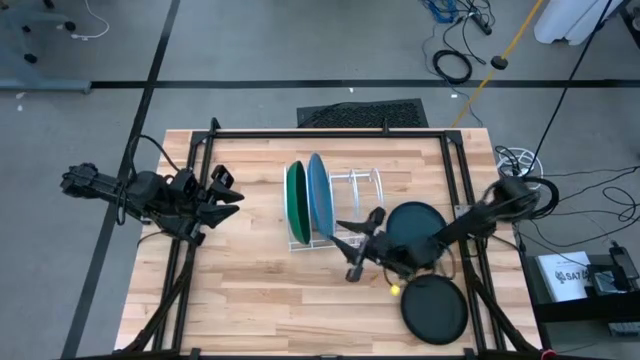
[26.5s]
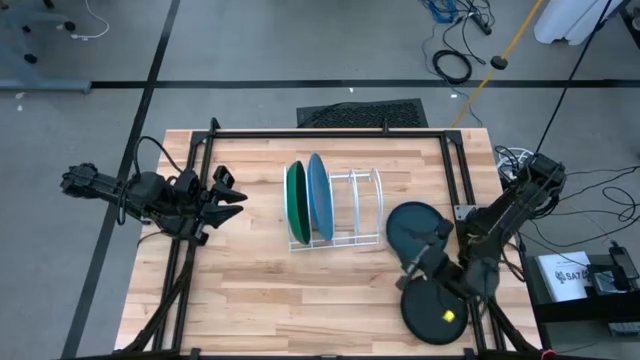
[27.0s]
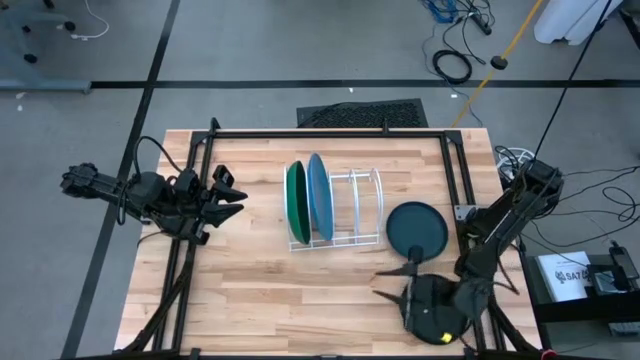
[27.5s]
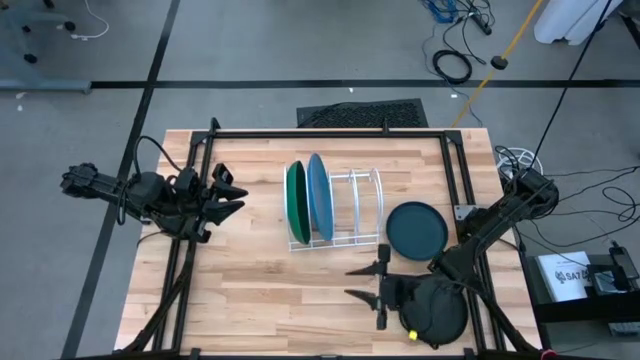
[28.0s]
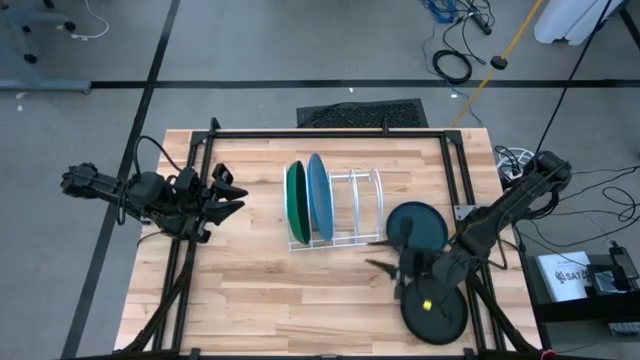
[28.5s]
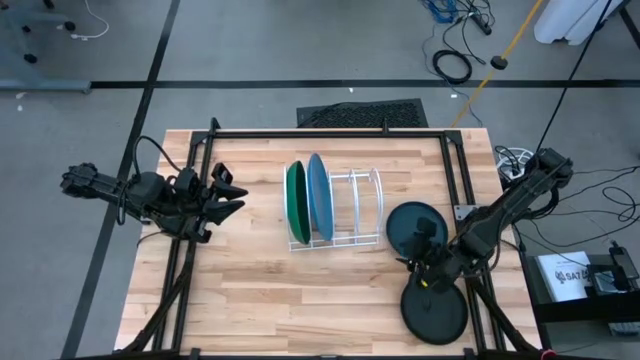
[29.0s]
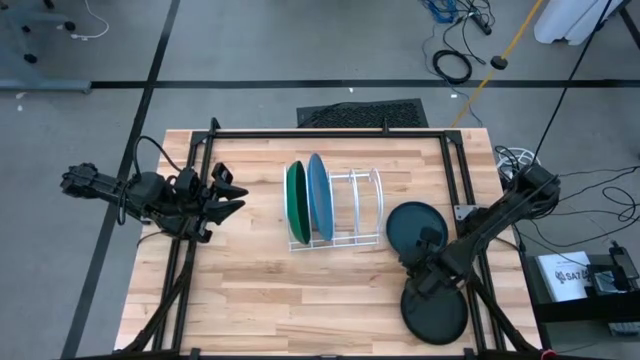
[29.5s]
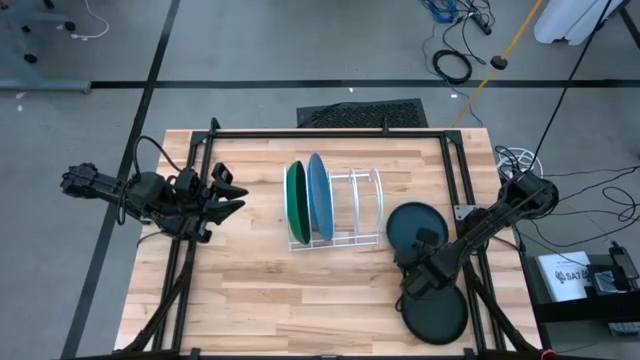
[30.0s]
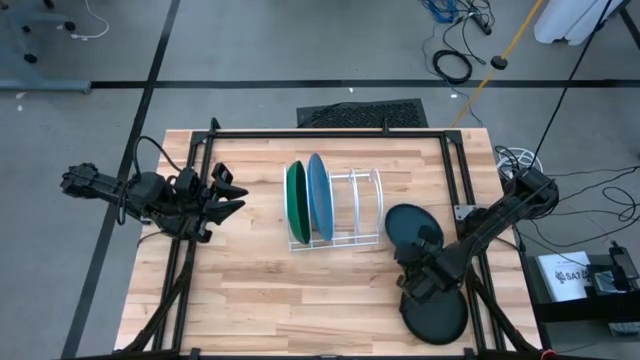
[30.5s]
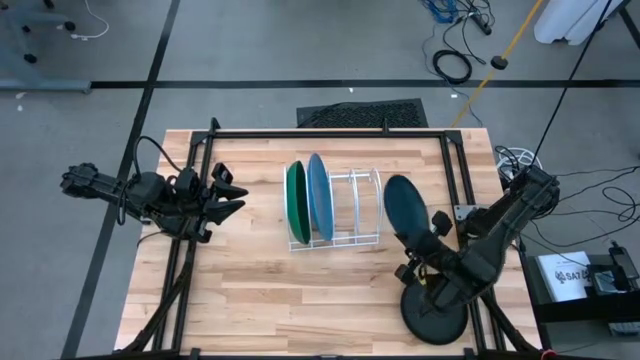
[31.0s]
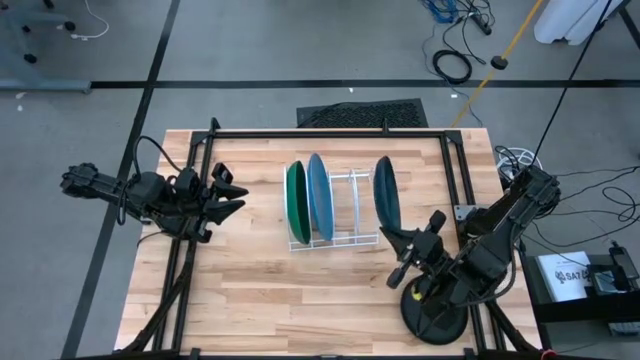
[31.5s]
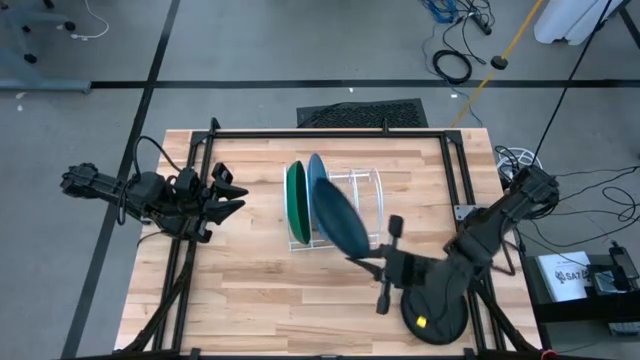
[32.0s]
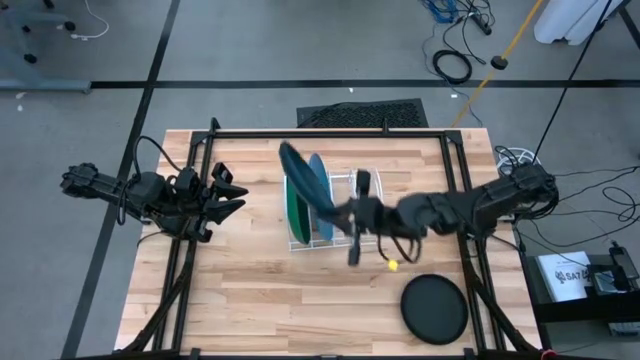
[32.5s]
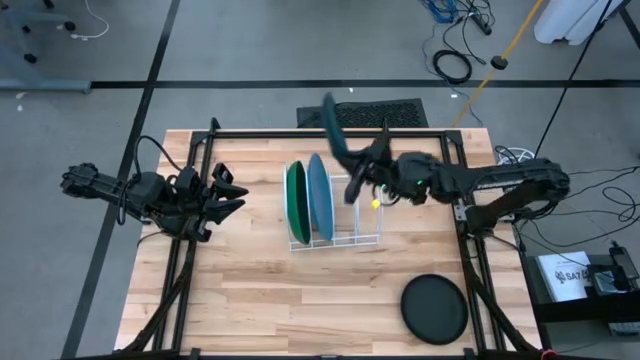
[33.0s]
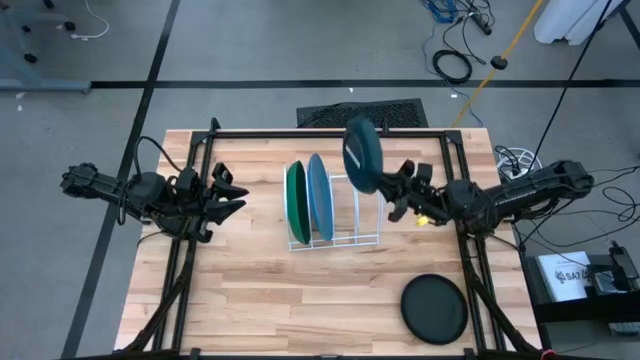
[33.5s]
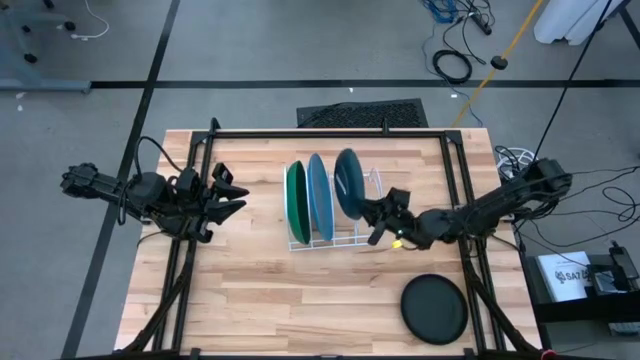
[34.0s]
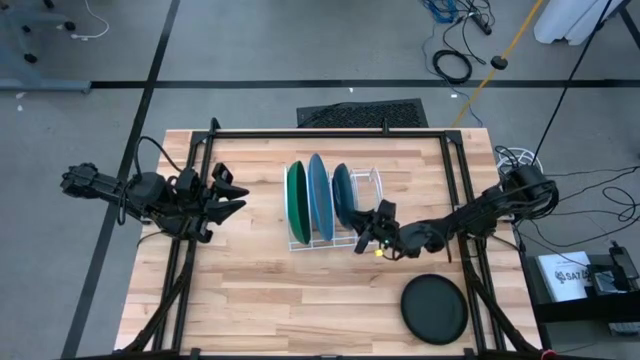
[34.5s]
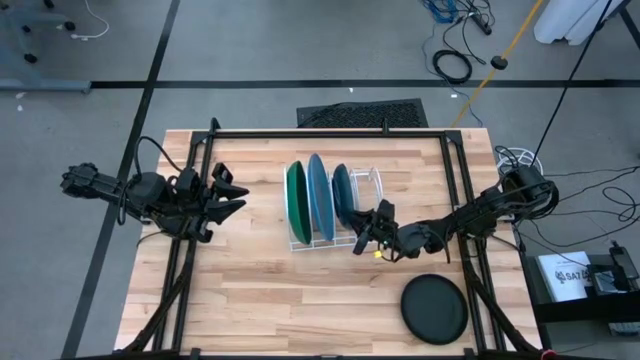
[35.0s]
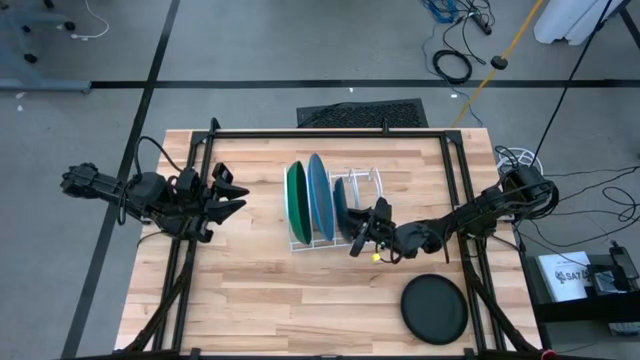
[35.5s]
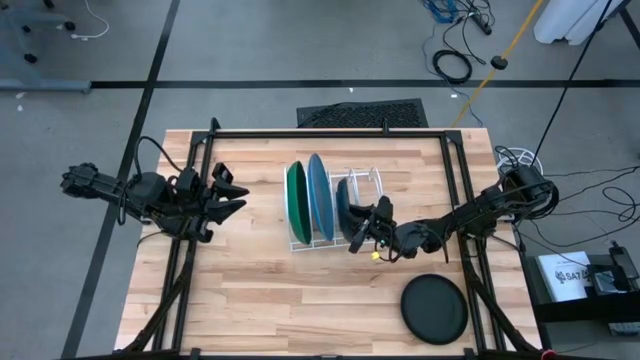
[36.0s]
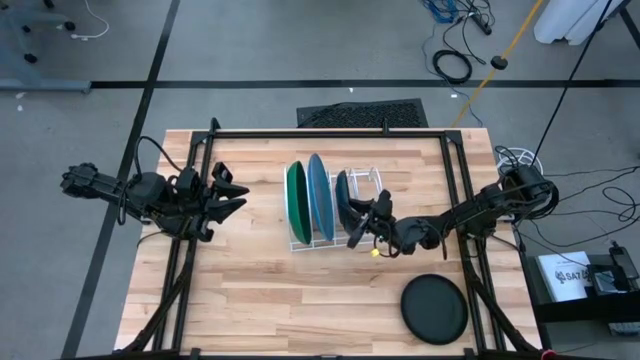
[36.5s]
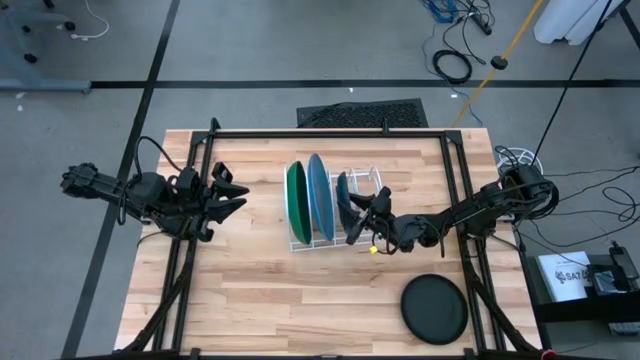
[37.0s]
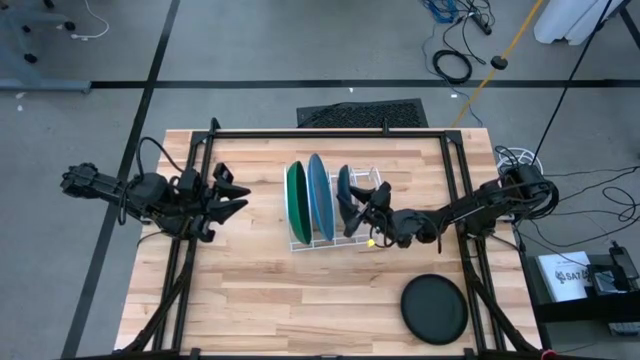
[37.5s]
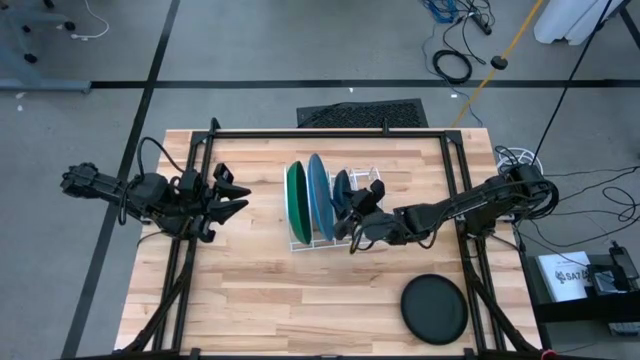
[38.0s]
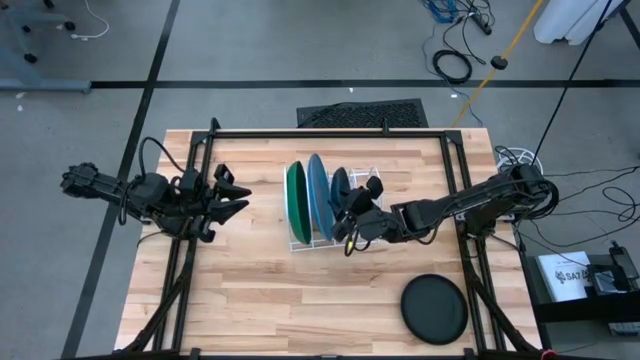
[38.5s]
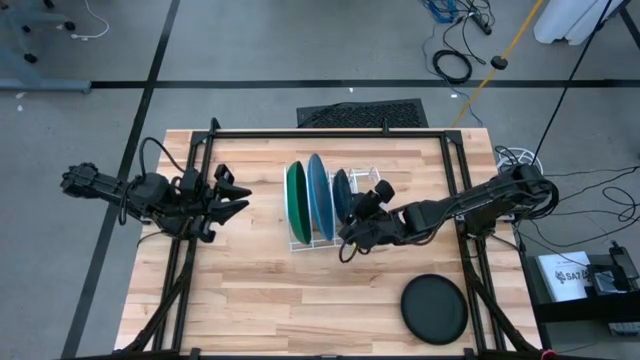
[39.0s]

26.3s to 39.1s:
Task: Sort dishes
Put the dark blue plate into the white dish rack

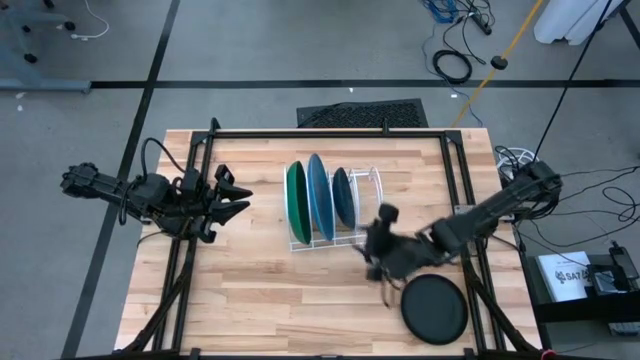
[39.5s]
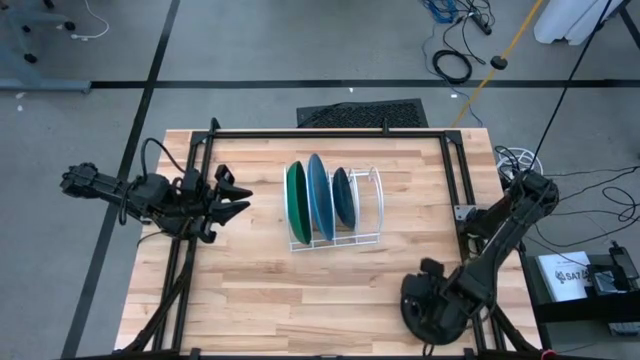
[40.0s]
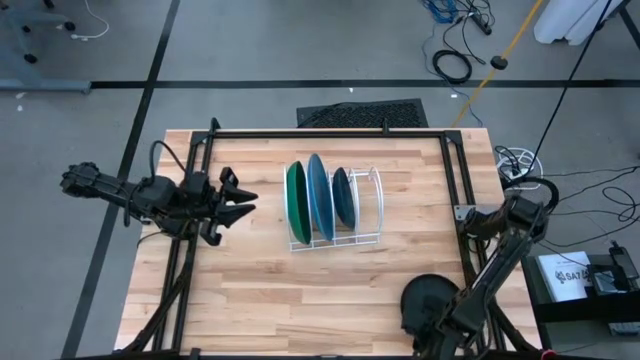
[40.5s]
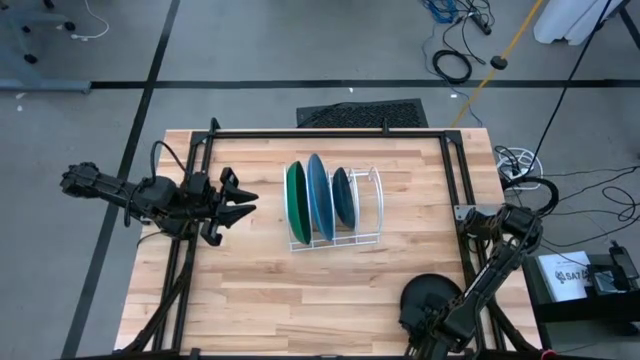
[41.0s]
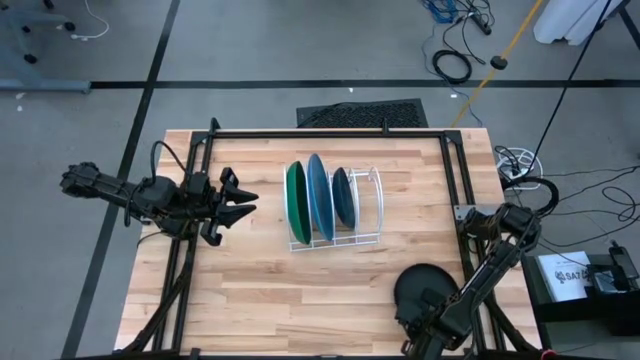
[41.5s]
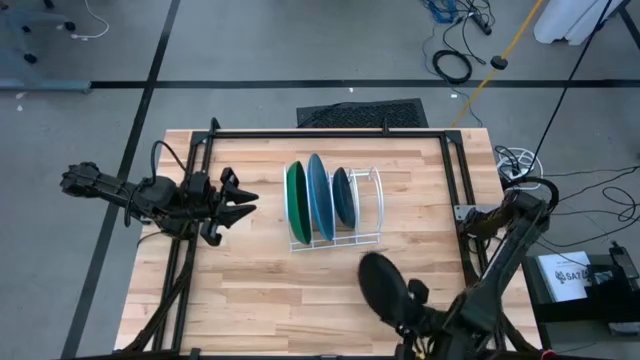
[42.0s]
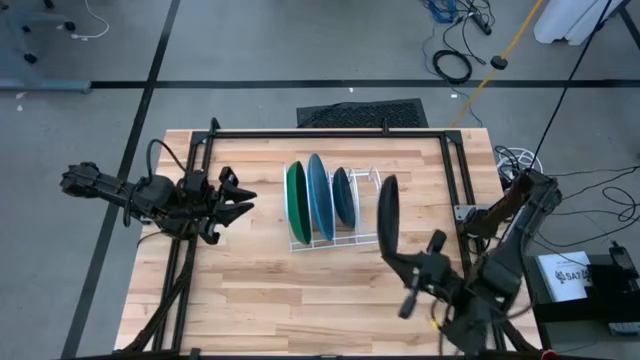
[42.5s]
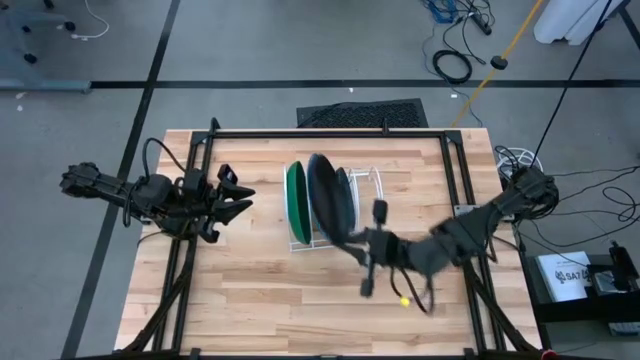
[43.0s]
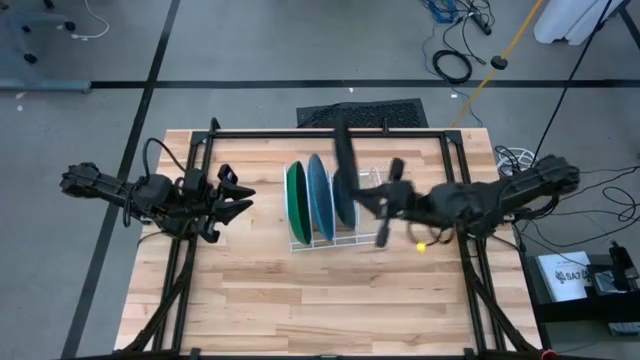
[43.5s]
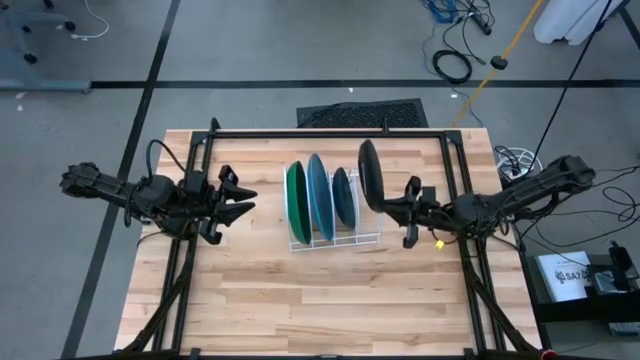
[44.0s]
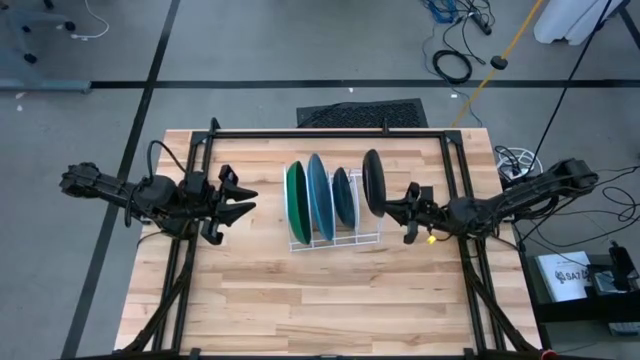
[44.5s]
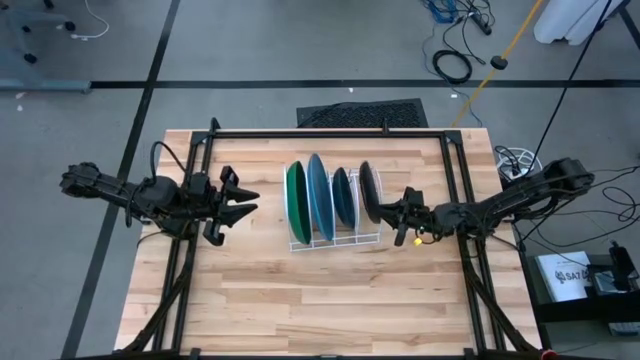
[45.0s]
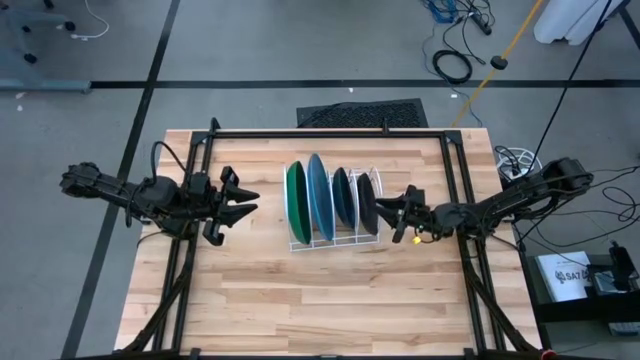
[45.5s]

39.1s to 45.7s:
Put the black plate into the white dish rack

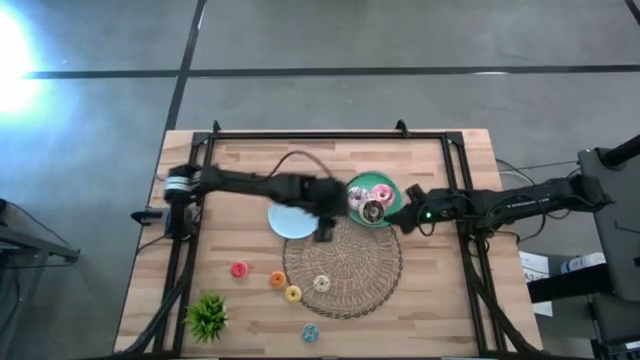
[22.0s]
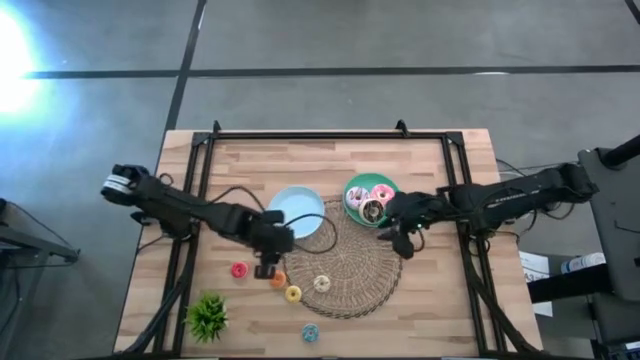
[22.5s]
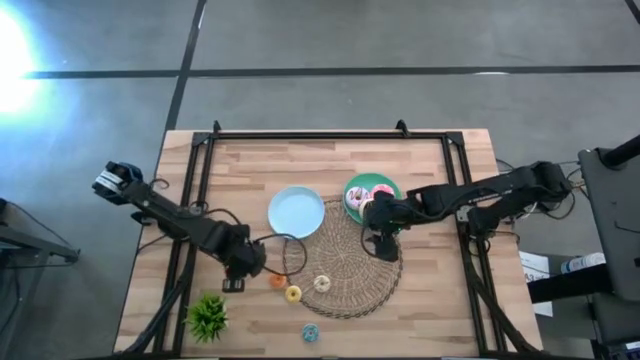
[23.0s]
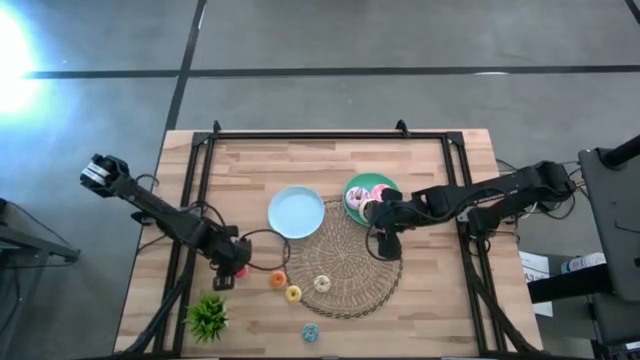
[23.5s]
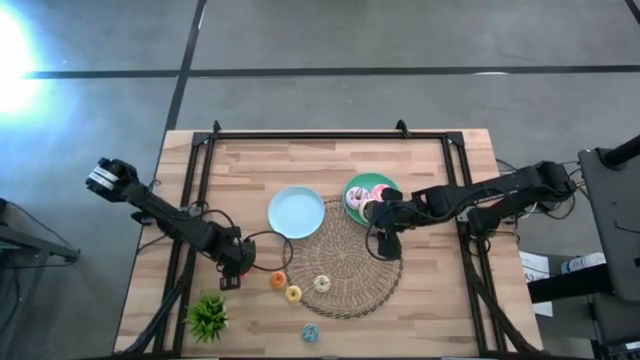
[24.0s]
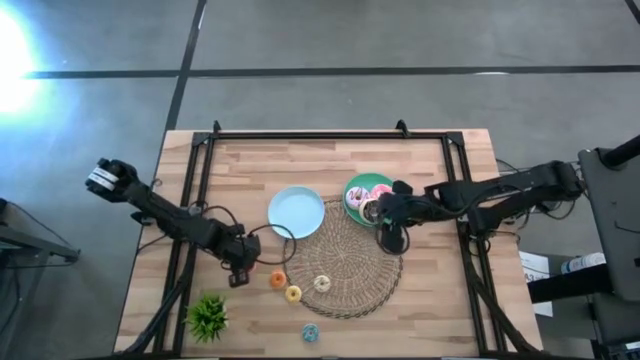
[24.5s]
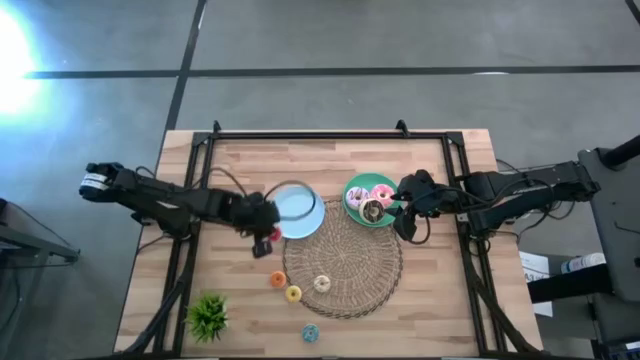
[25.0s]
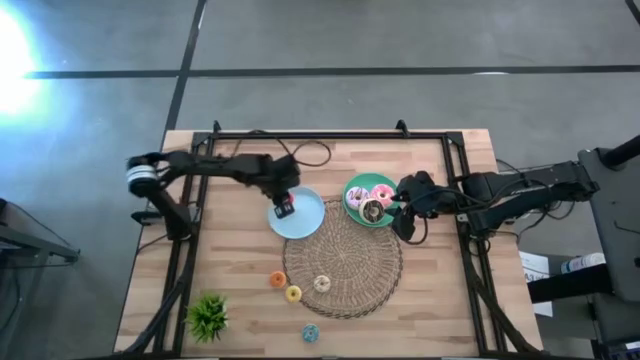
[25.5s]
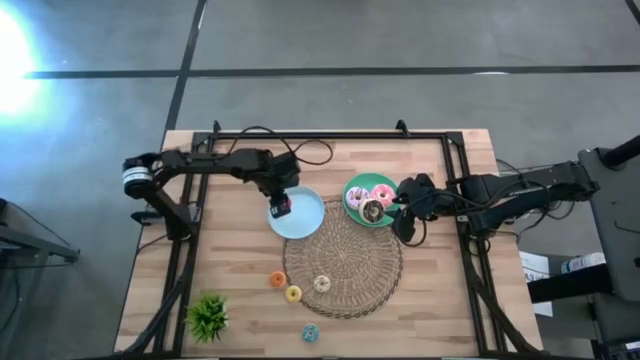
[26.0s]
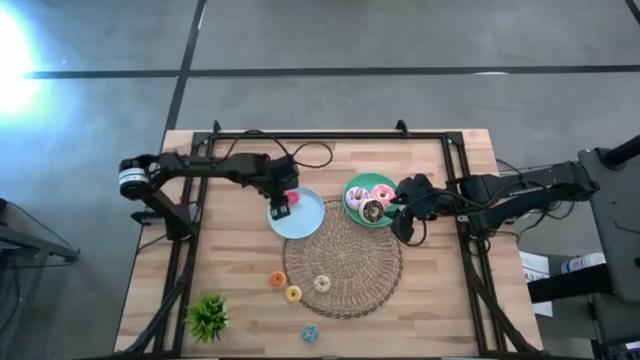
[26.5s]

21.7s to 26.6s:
Task: Pick & Place donuts
Put the small red donut on the blue plate
